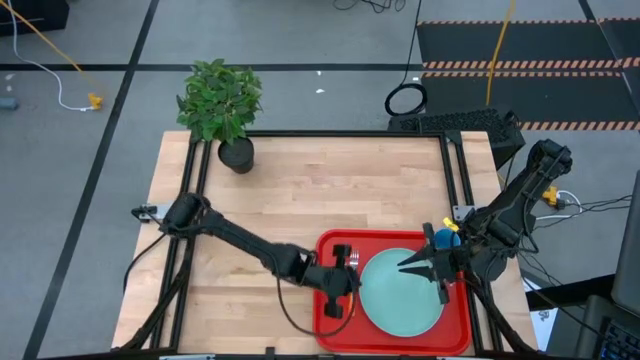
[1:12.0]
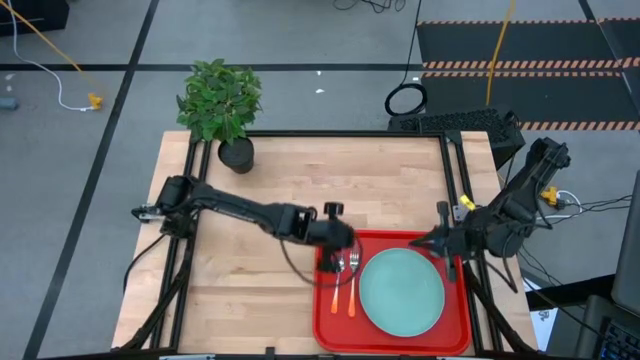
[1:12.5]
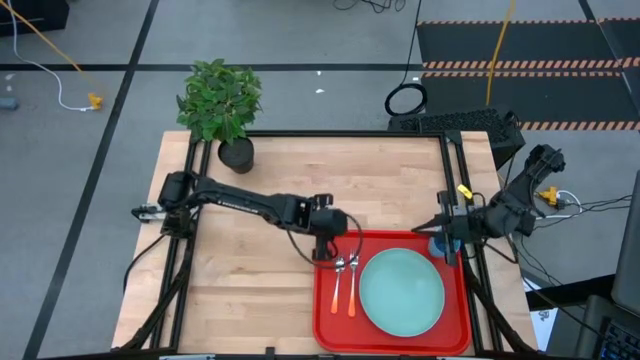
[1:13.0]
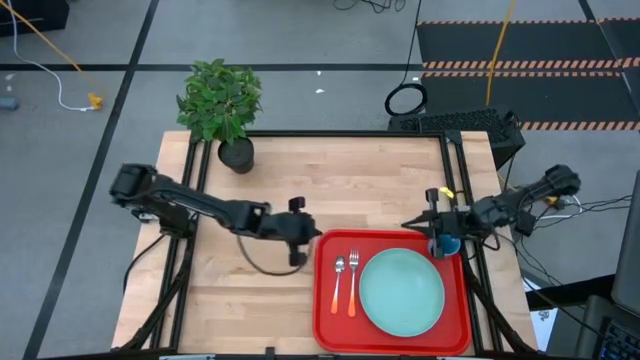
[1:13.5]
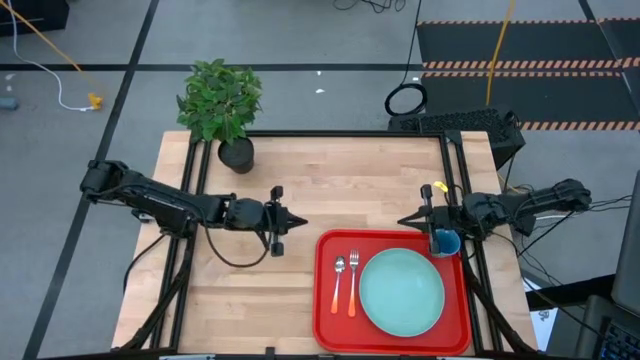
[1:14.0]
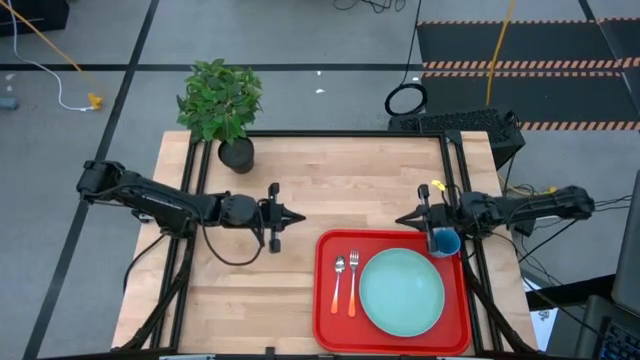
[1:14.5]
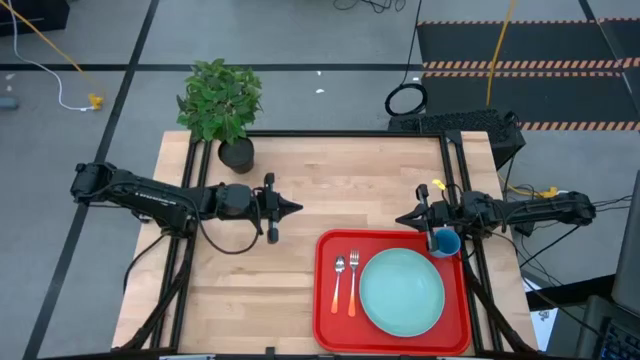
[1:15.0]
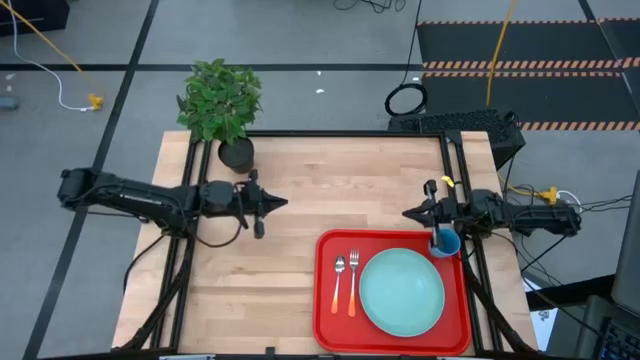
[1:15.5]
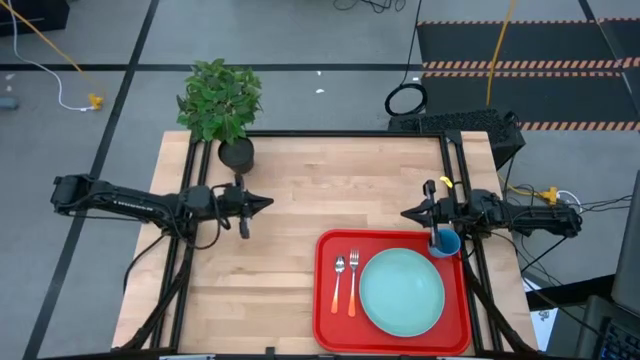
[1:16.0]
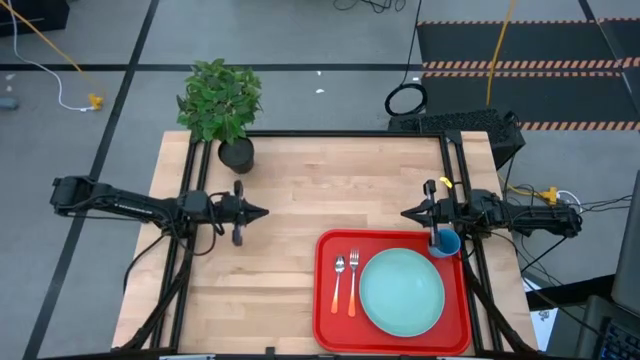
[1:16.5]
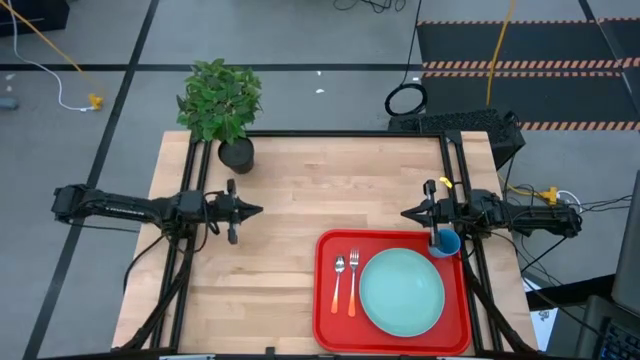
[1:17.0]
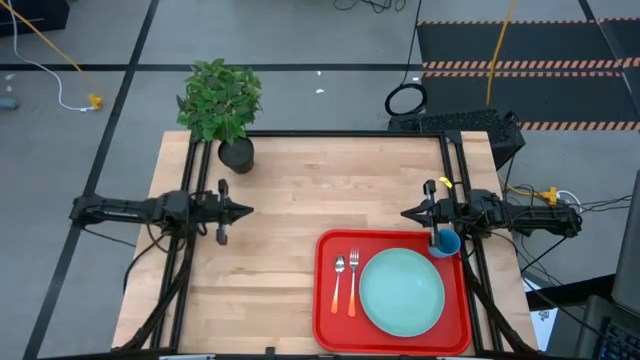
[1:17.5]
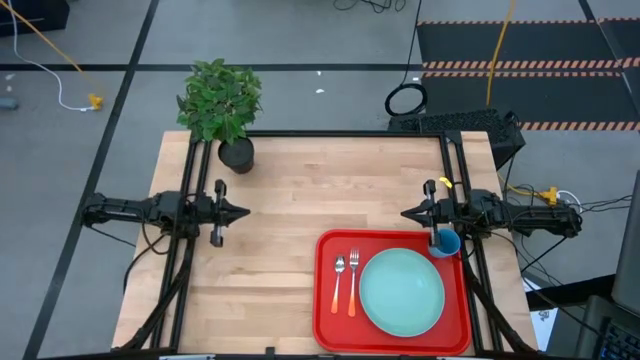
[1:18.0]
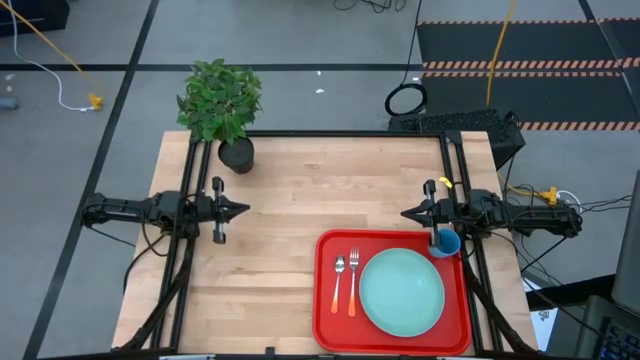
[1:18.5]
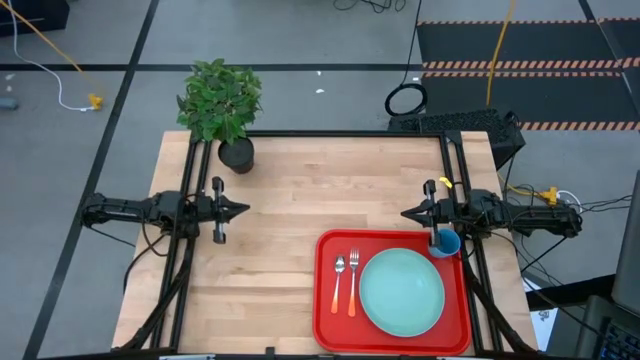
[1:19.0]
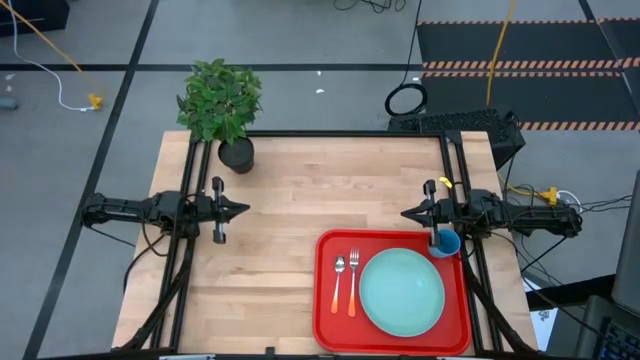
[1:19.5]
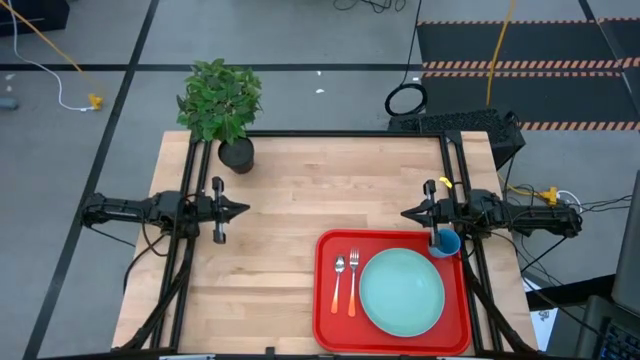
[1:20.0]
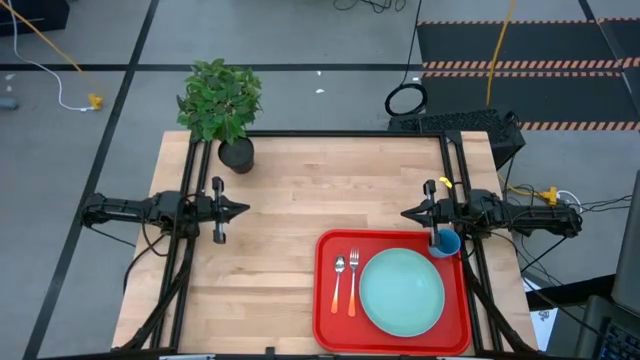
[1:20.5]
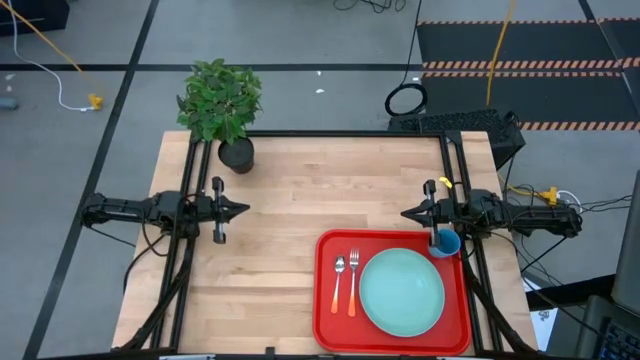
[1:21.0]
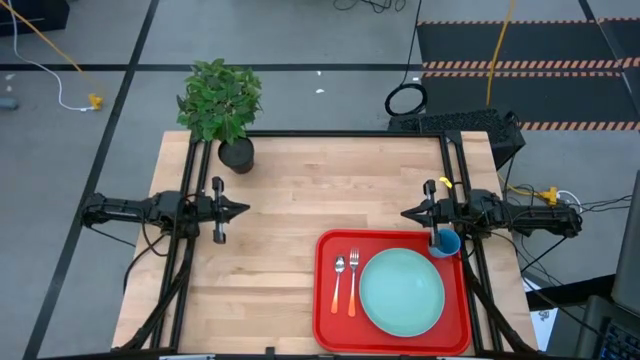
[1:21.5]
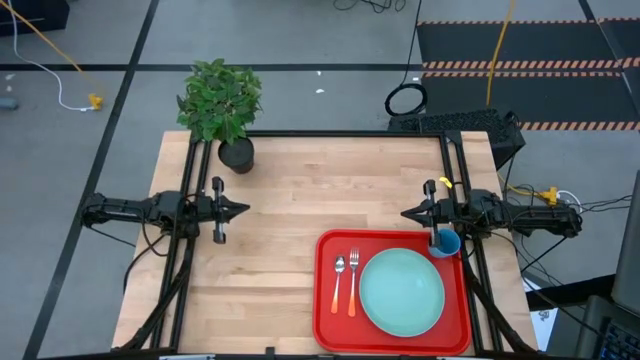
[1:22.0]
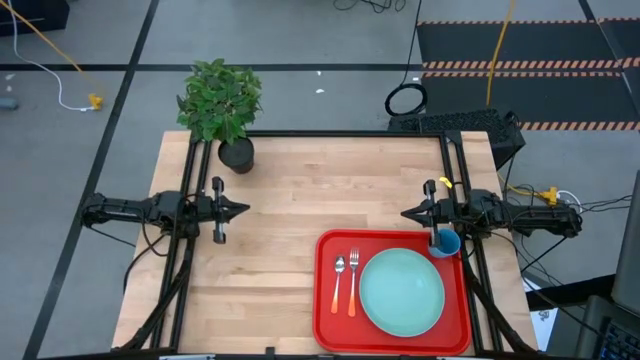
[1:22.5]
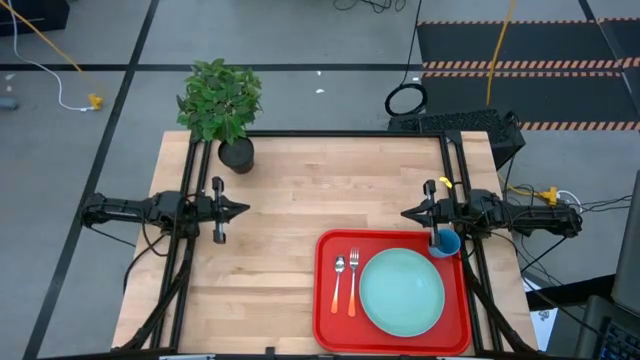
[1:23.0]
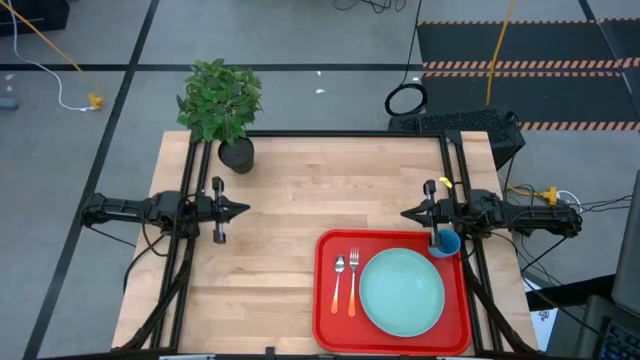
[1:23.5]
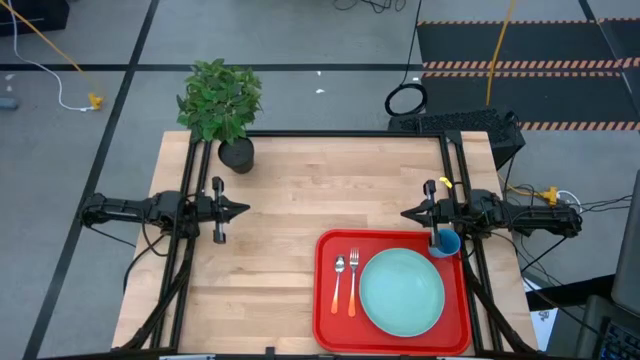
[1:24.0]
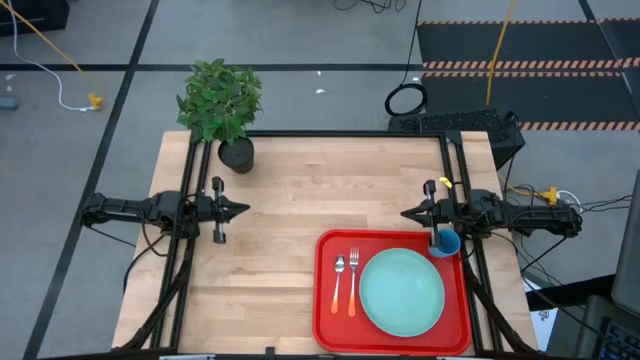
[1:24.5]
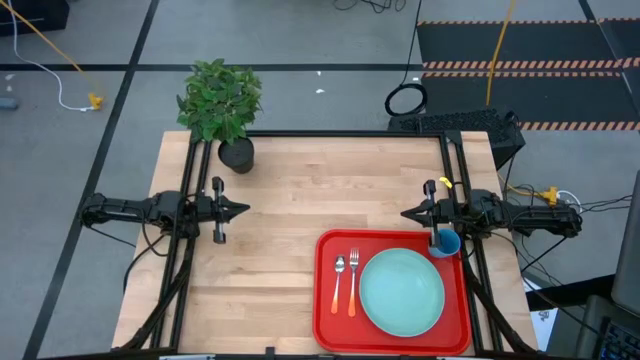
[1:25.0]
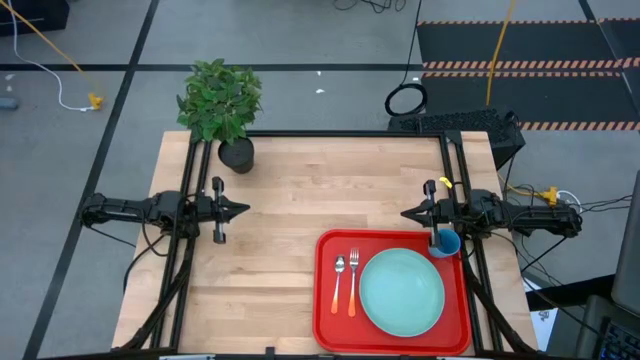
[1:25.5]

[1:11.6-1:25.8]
Task: Pick and place plate/cup/fork/spoon on tray
Return to Home Position

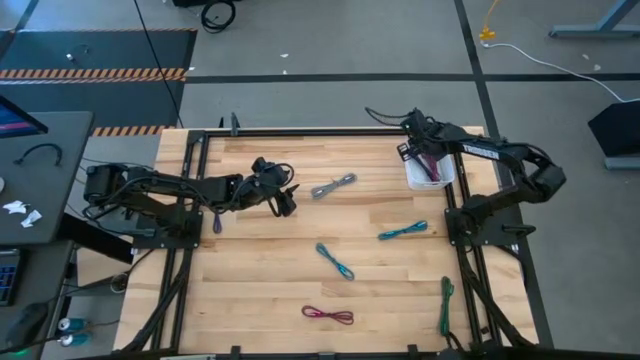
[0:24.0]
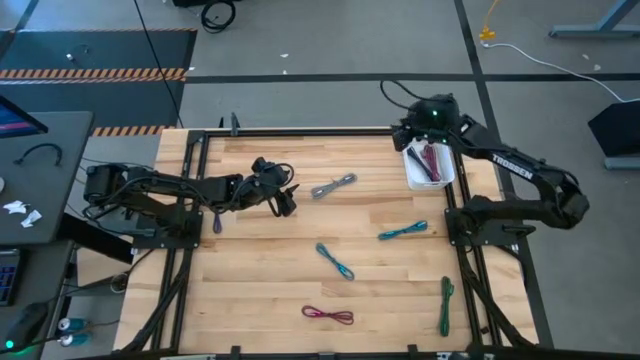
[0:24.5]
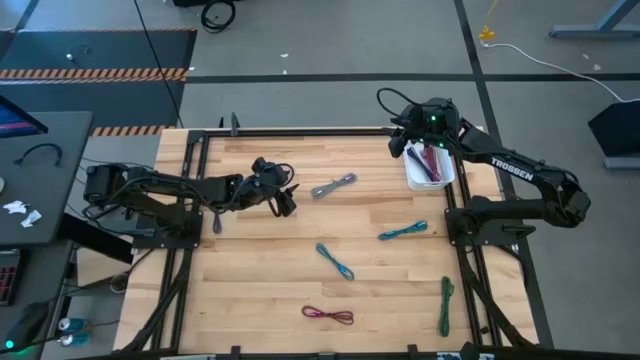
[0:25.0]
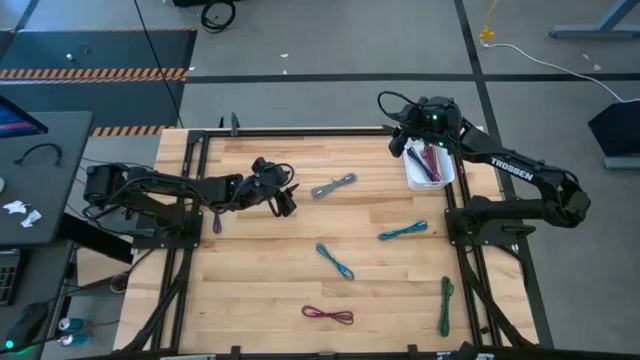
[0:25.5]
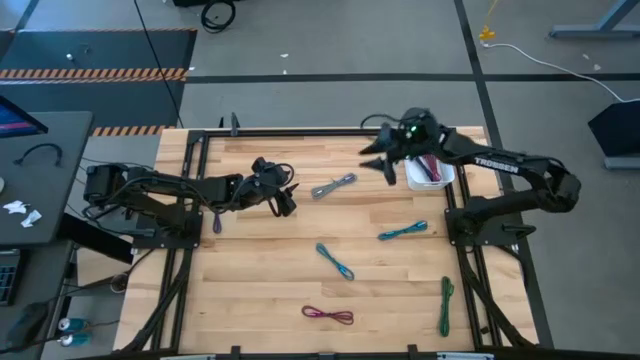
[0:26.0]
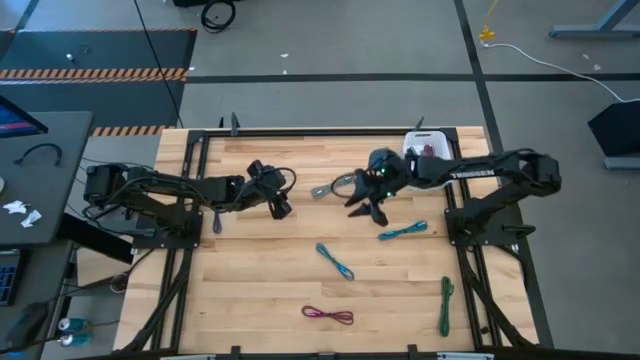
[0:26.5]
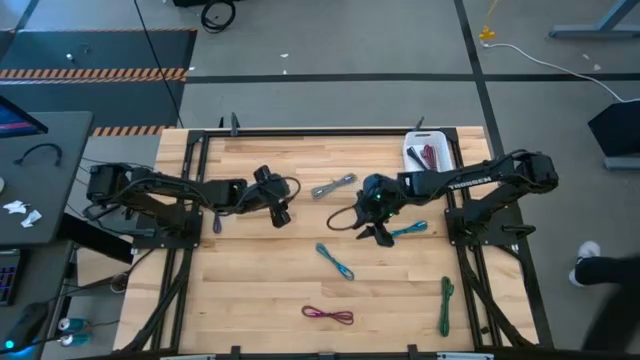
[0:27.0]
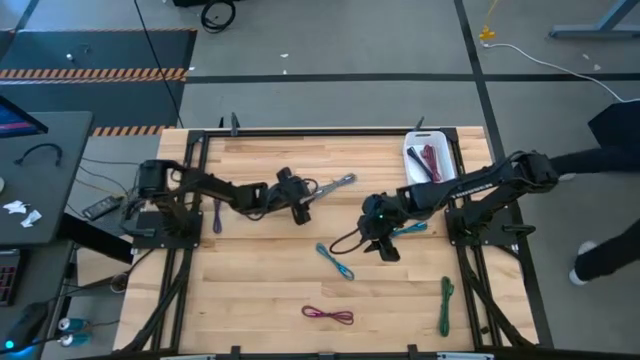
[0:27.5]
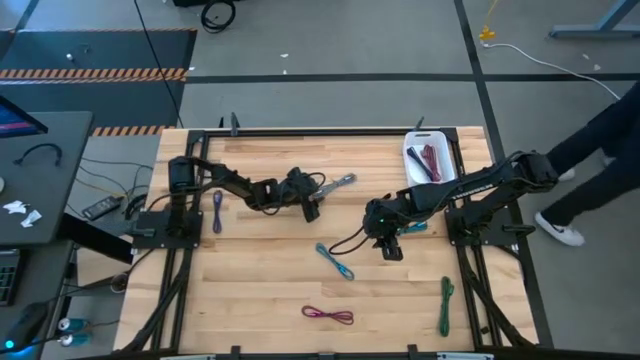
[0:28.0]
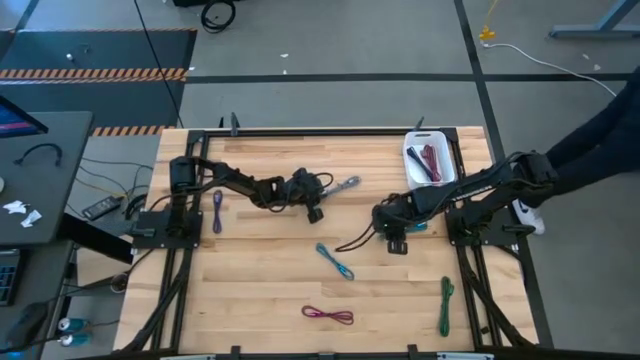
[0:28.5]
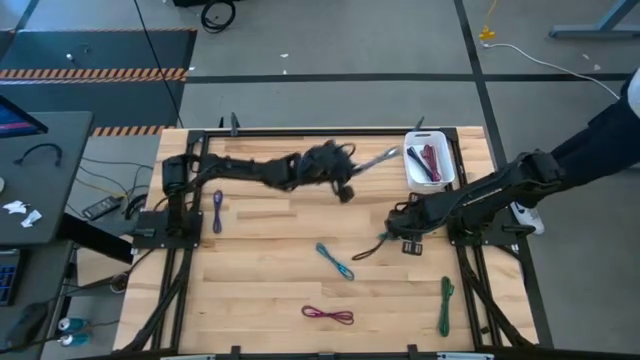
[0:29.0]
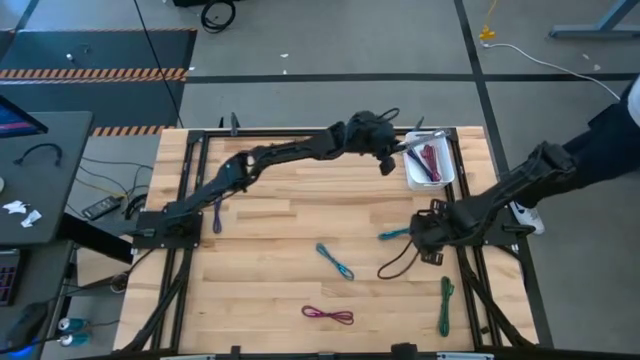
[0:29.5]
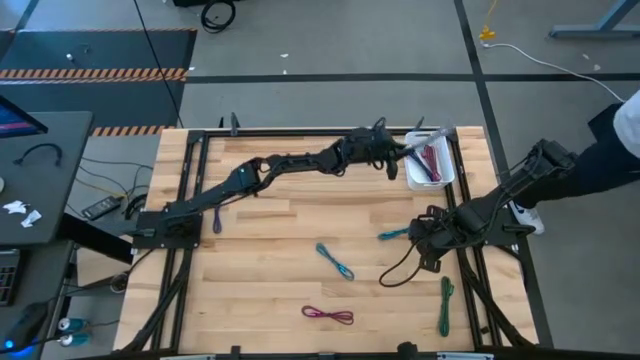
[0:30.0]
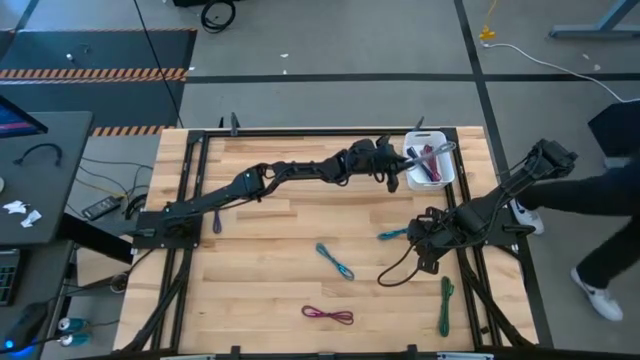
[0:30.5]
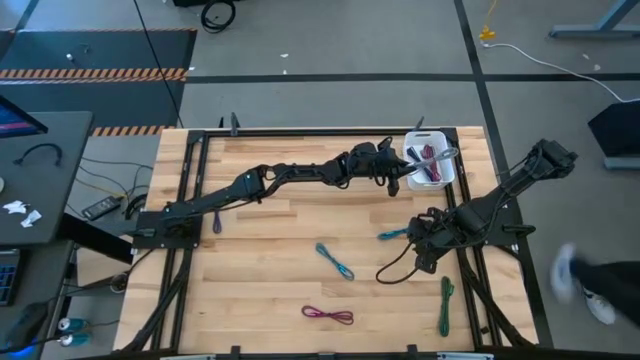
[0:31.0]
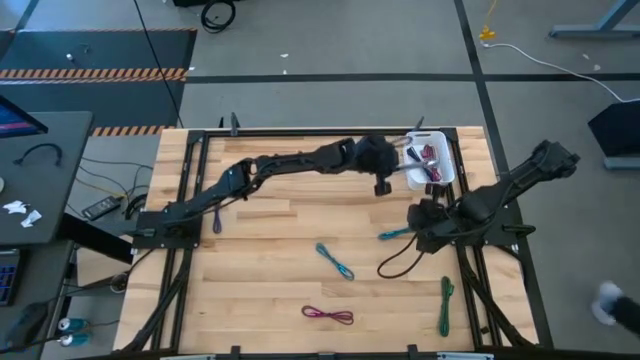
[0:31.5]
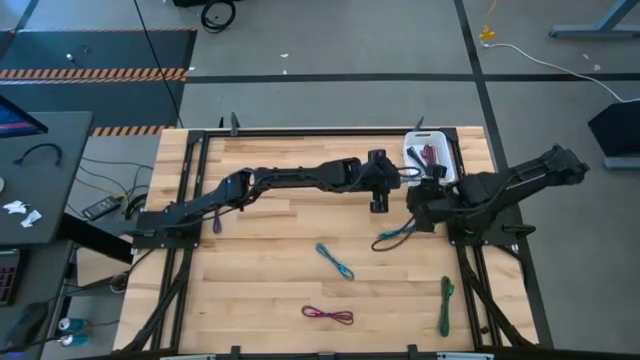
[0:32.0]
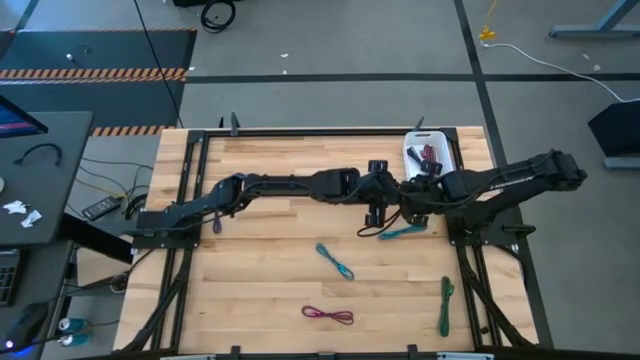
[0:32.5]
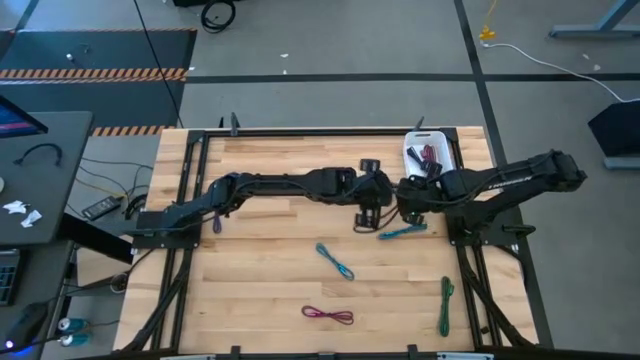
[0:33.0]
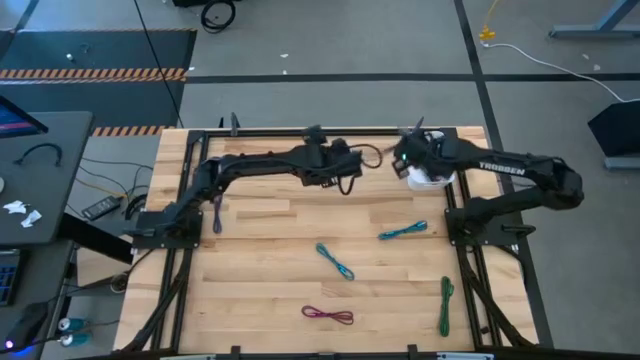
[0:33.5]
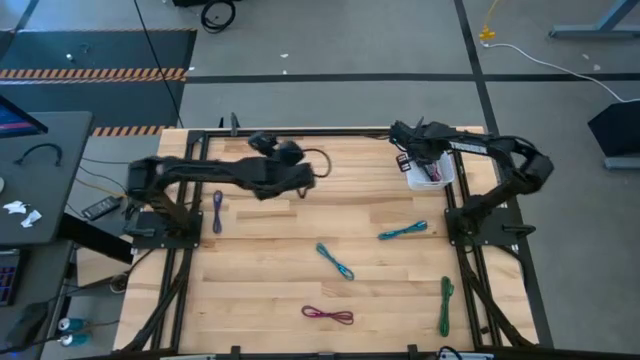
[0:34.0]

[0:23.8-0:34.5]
Task: Pick and place USB-C Cables
Put the black white charger cable into the bin
